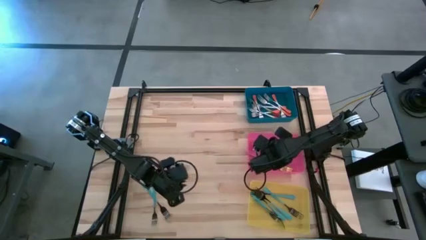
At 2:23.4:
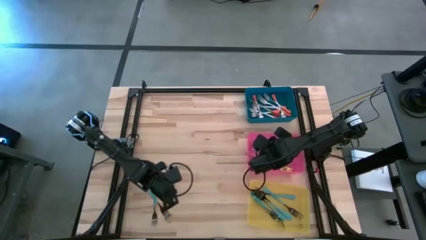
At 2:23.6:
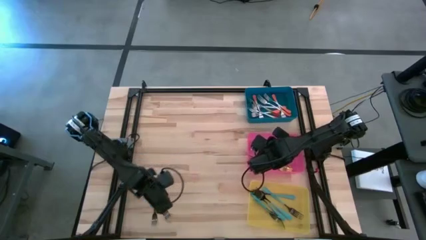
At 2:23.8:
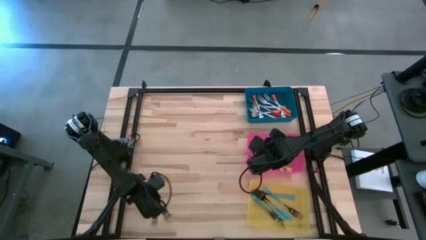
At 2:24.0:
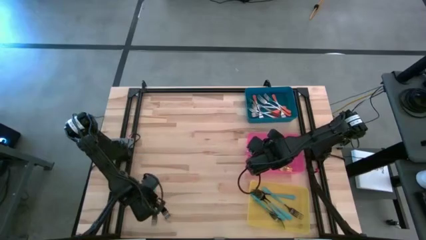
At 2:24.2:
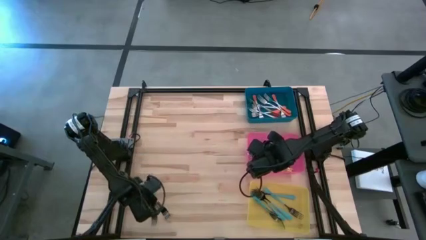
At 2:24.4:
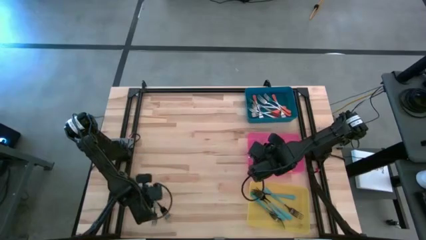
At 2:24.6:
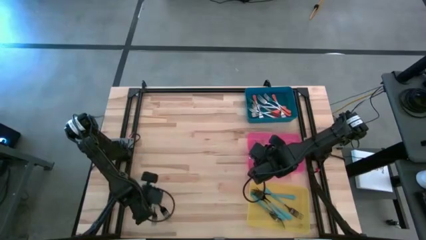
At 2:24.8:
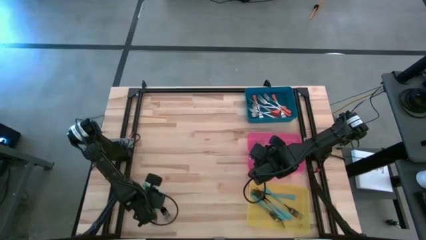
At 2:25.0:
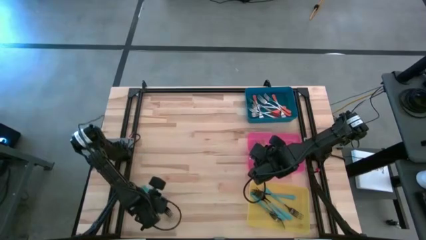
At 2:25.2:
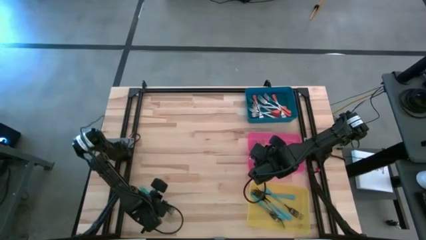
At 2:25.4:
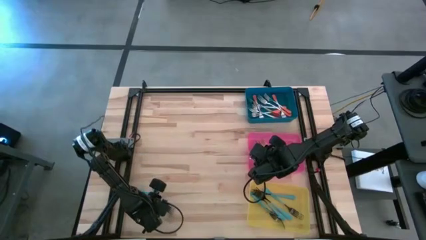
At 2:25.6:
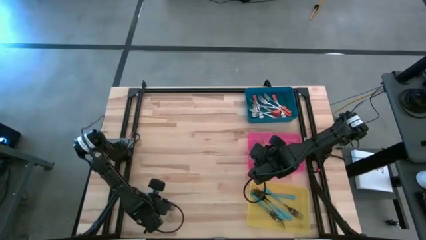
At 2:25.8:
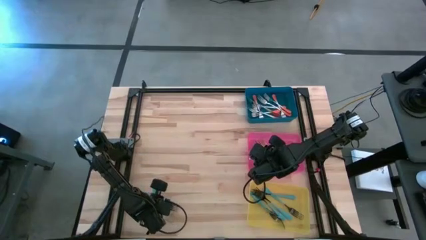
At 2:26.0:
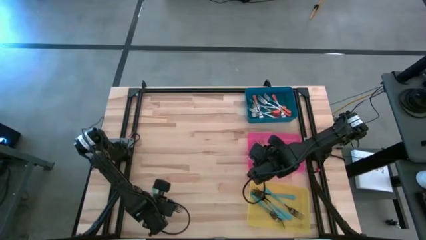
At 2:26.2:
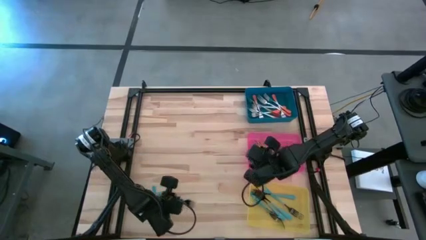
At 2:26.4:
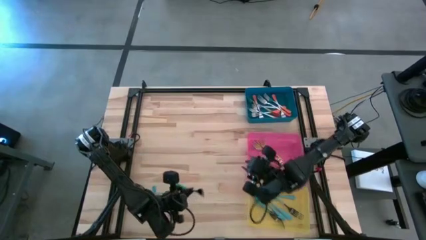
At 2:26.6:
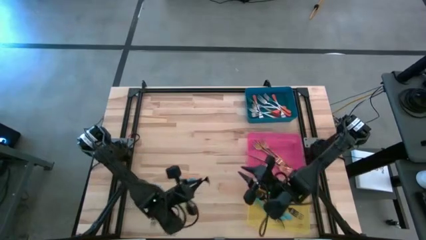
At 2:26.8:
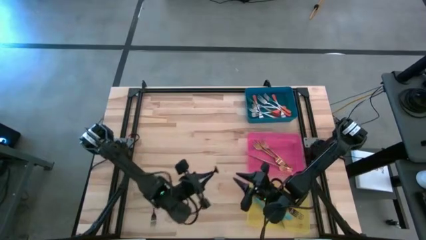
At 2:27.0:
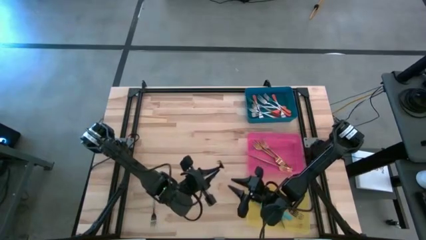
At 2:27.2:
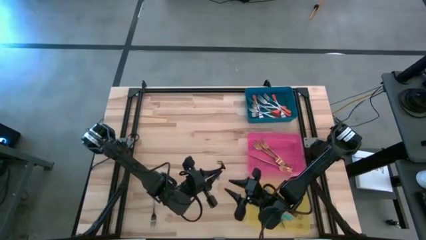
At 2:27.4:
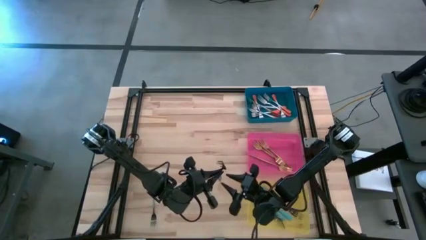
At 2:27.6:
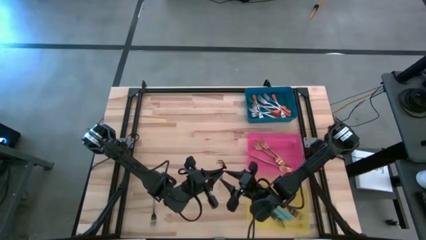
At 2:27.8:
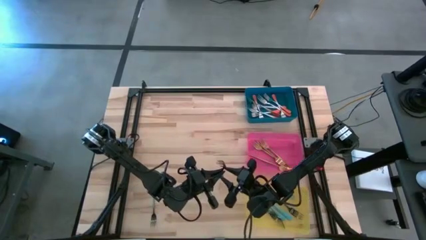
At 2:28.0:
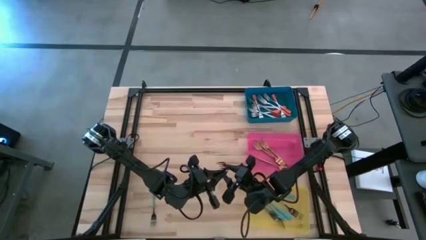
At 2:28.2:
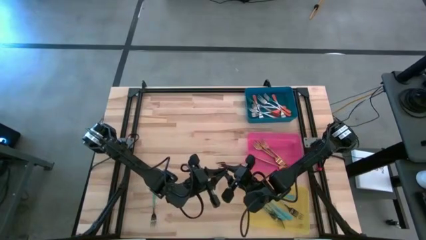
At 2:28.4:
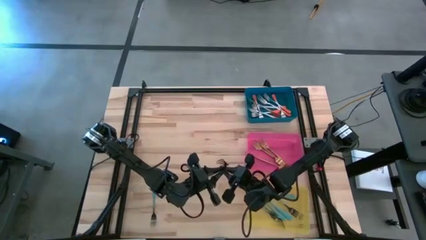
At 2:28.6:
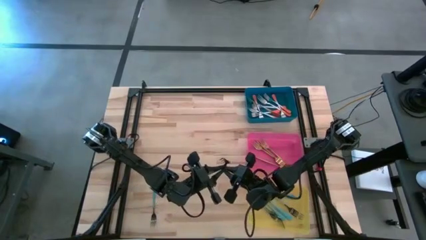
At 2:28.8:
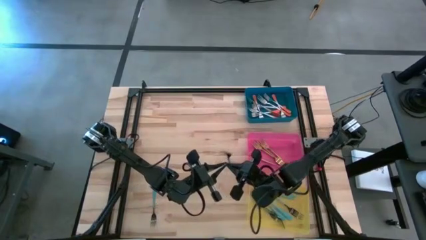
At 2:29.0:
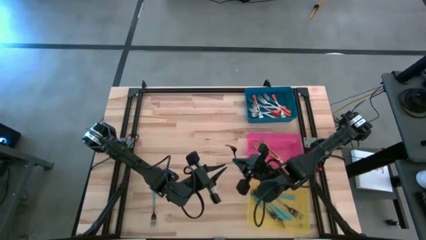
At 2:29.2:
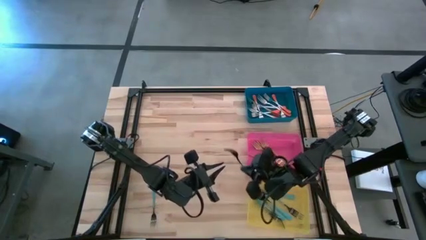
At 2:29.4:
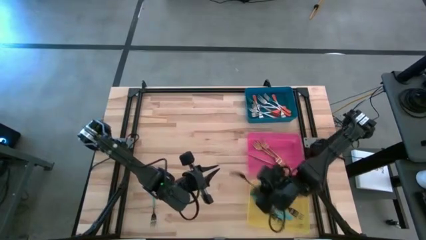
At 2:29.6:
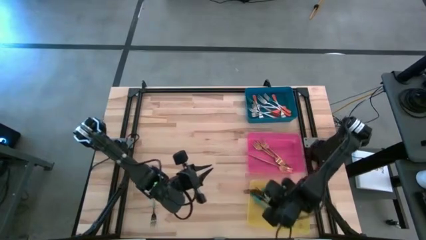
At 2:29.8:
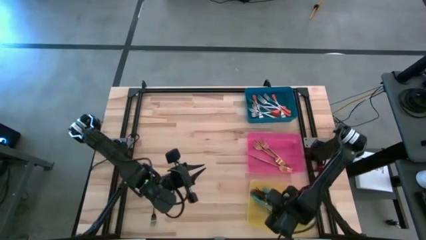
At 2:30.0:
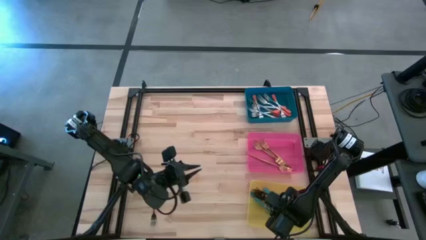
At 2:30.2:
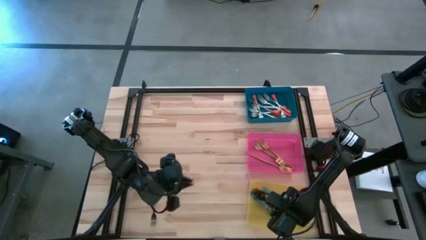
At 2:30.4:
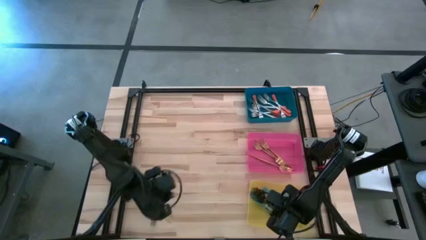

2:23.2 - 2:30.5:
Task: Sort silverware by color (type)
Put the blue fork into the yellow bin

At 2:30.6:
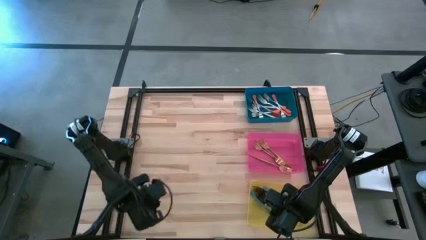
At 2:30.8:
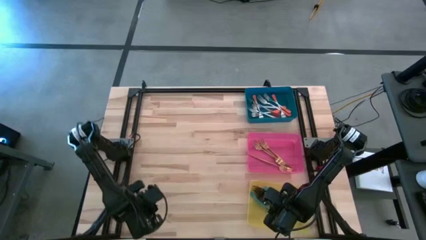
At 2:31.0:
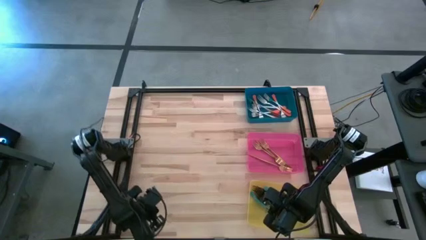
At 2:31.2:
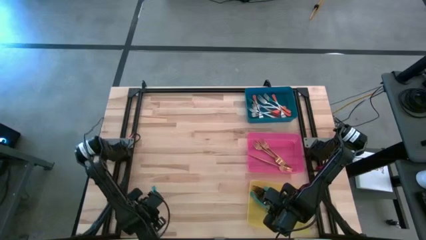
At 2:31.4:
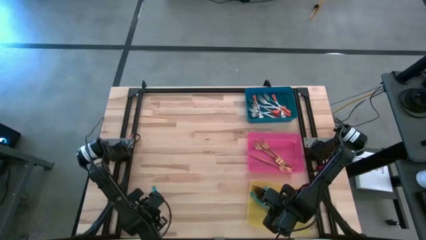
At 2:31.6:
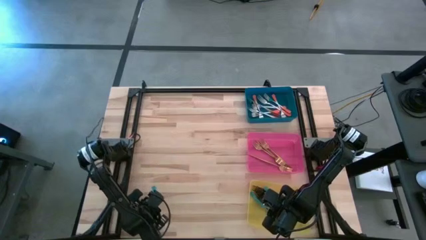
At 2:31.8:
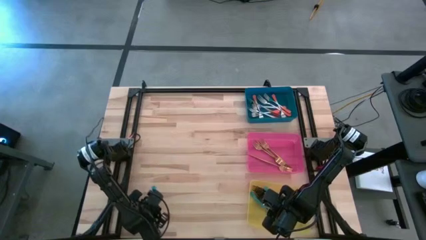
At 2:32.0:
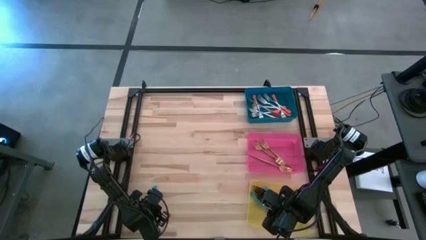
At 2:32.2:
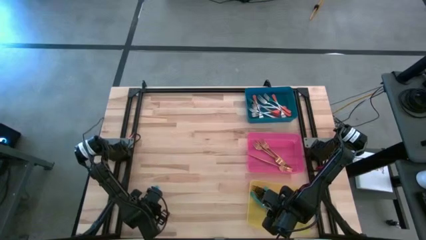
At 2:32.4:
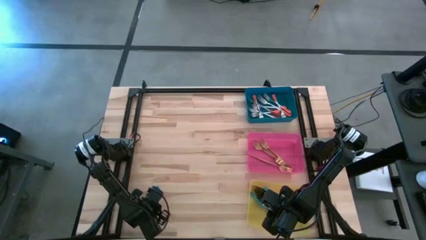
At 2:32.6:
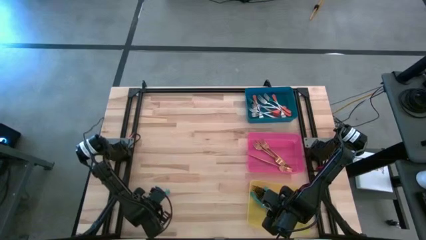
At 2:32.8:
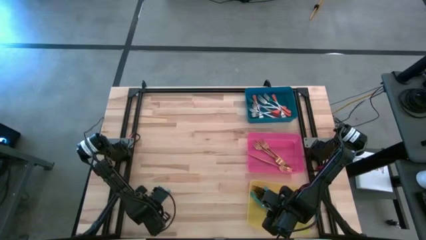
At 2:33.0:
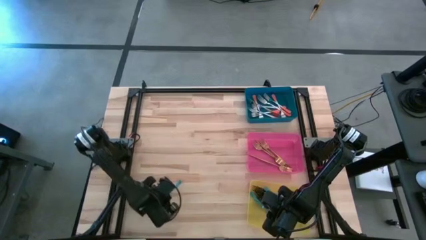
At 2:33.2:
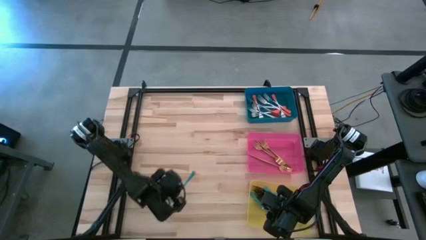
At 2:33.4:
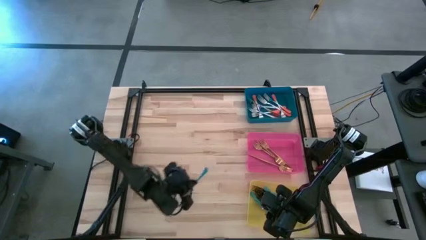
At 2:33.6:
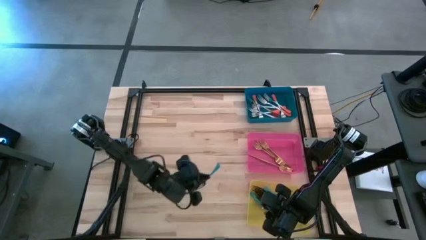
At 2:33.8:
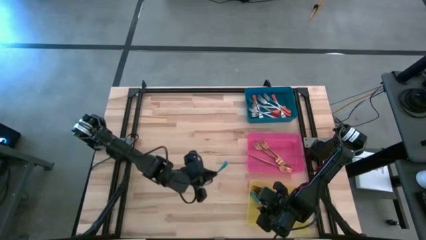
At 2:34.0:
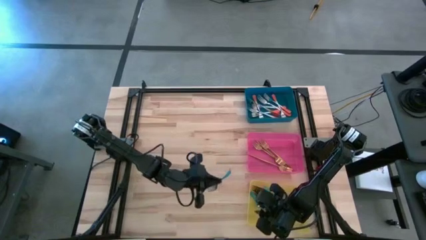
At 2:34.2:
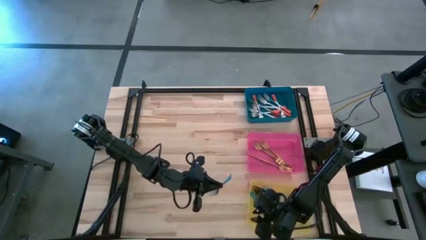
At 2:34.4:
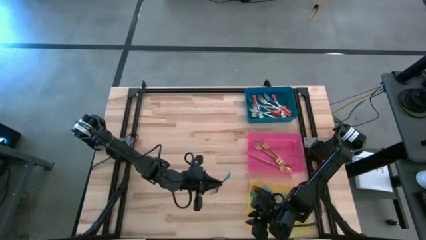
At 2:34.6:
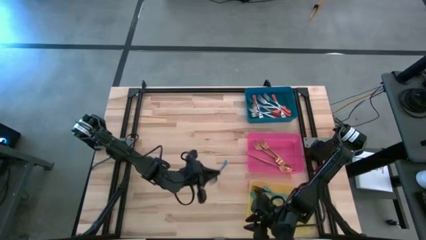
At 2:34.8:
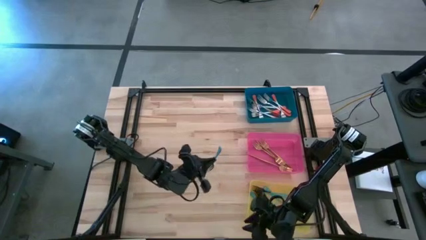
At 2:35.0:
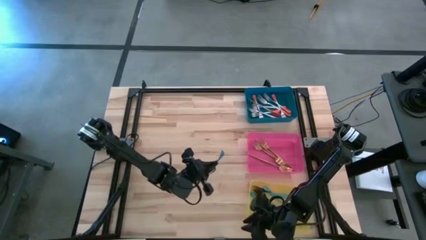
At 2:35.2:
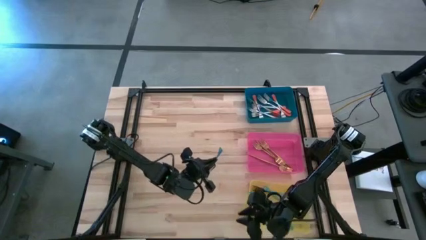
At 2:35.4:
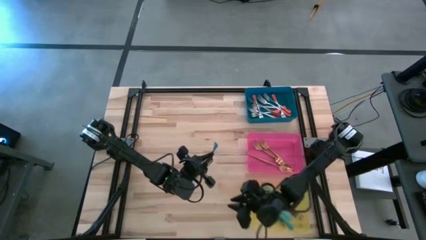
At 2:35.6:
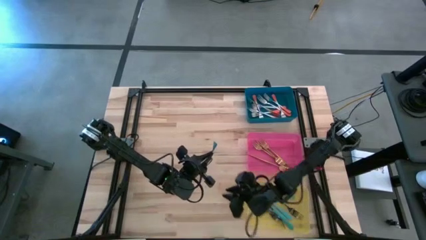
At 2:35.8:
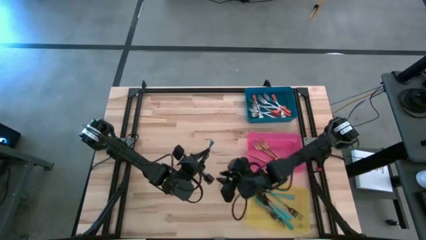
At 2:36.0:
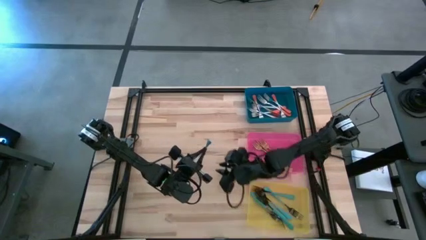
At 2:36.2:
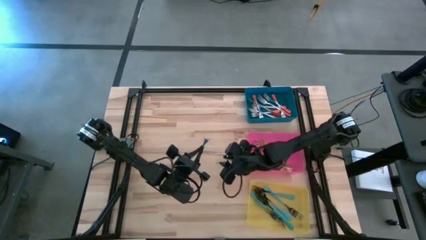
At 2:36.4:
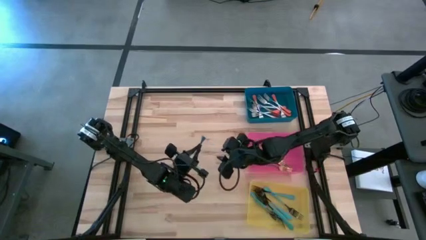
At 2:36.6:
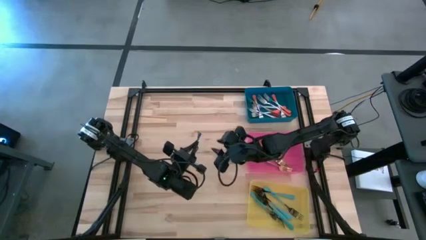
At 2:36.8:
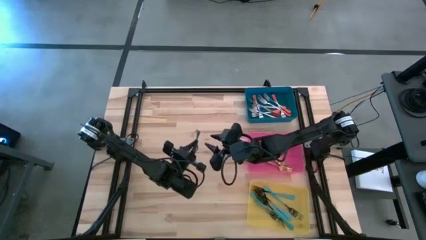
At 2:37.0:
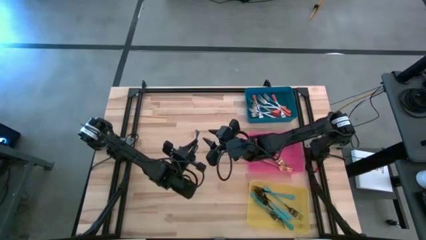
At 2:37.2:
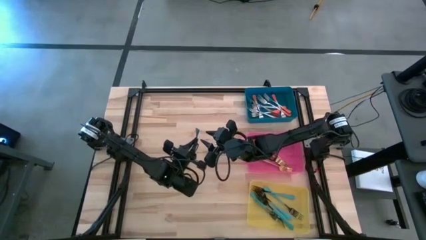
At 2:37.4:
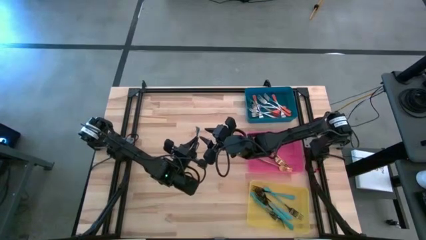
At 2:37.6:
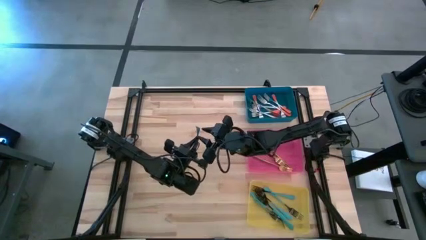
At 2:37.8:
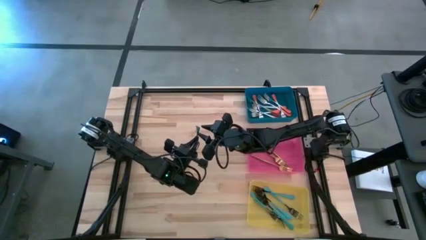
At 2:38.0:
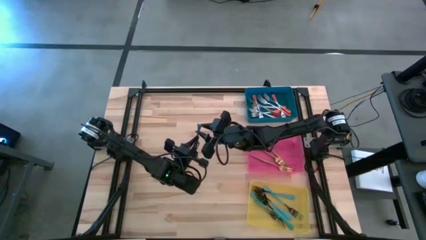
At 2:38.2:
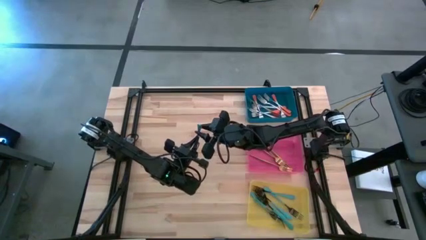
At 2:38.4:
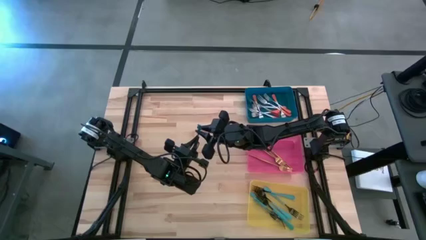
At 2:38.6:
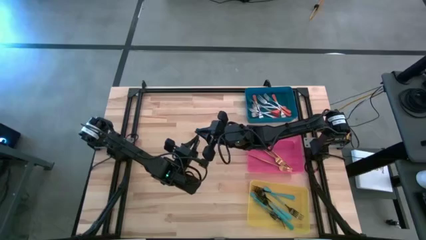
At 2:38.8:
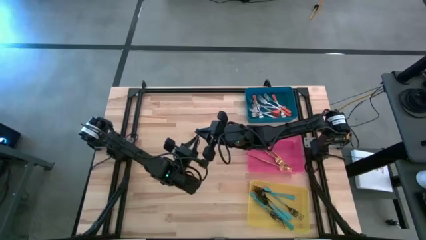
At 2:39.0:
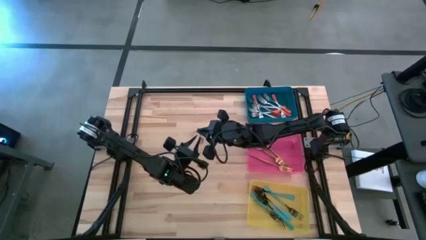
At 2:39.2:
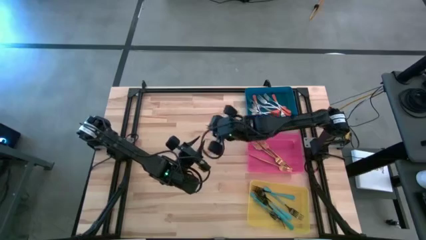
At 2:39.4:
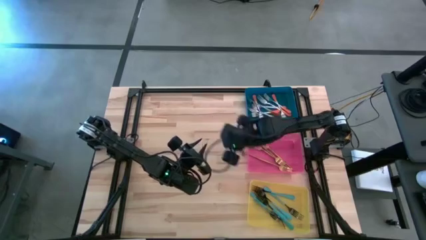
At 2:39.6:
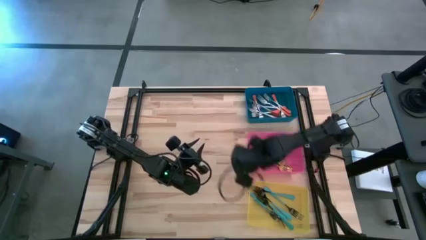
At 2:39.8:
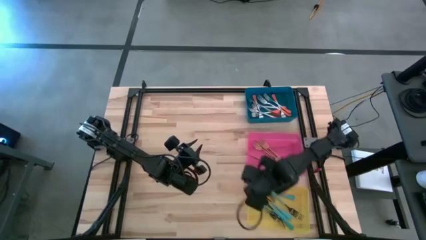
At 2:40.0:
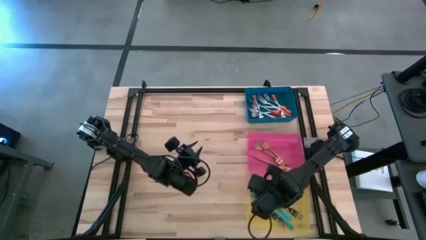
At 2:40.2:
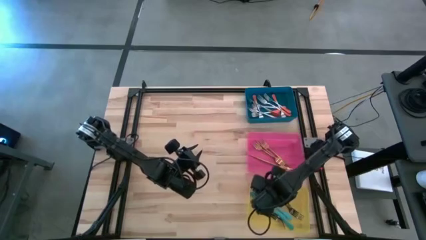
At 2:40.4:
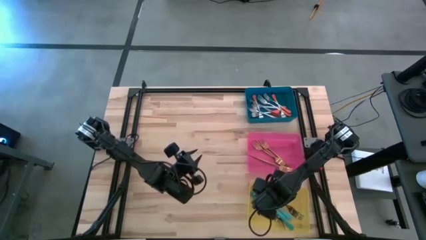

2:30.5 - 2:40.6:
Put the blue fork into the yellow bin
